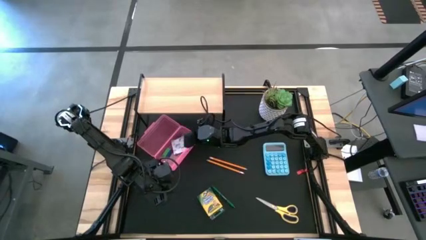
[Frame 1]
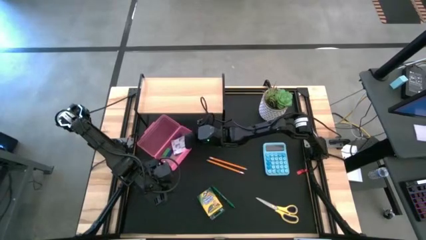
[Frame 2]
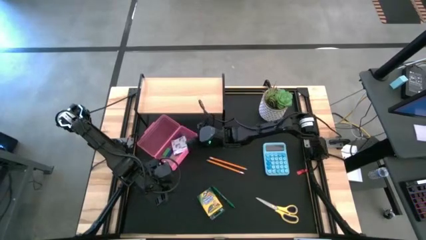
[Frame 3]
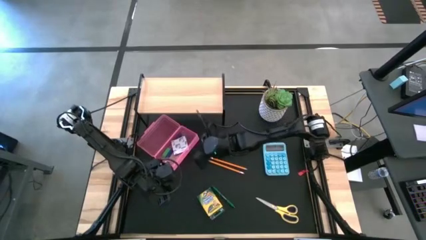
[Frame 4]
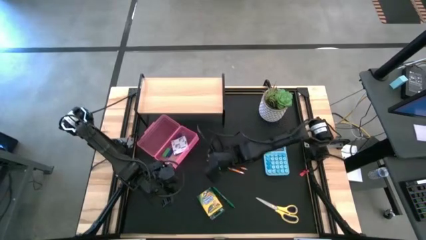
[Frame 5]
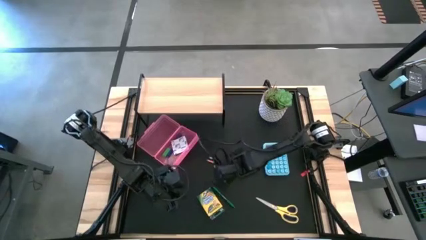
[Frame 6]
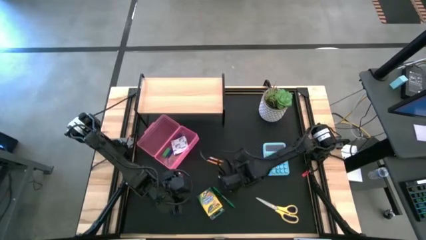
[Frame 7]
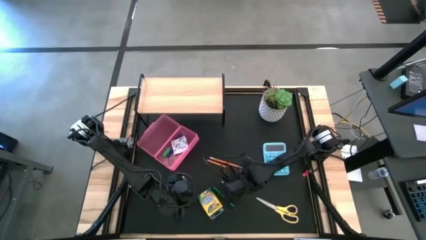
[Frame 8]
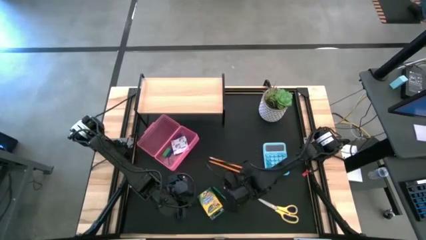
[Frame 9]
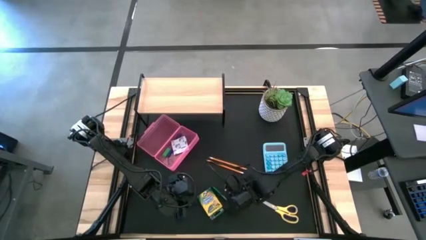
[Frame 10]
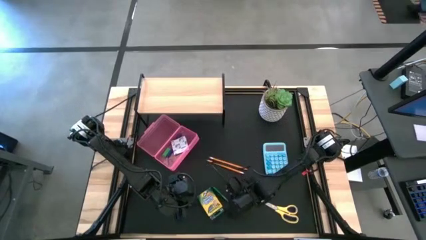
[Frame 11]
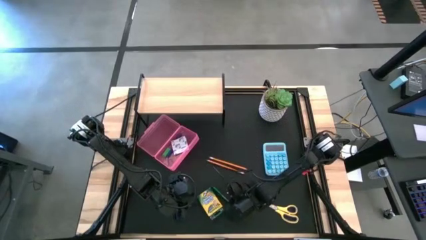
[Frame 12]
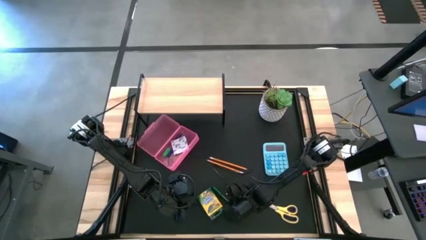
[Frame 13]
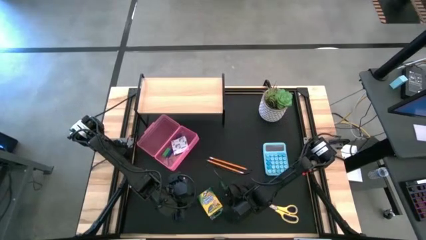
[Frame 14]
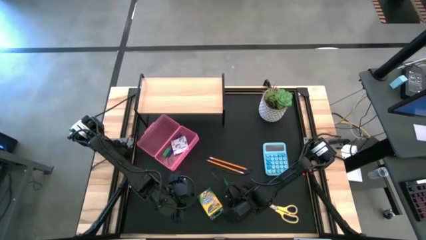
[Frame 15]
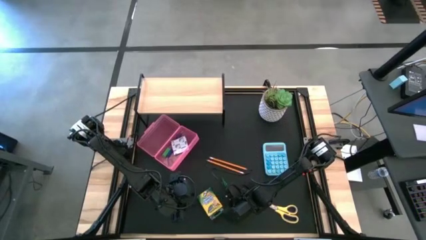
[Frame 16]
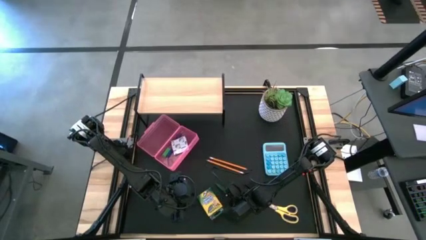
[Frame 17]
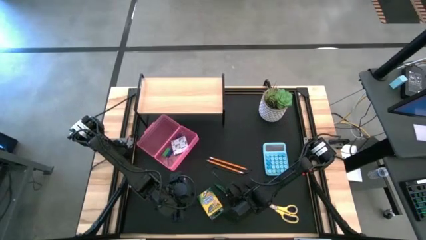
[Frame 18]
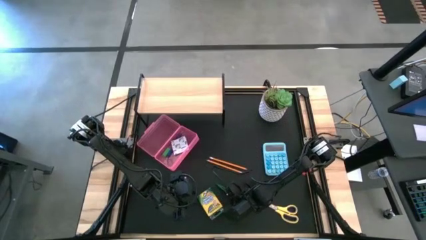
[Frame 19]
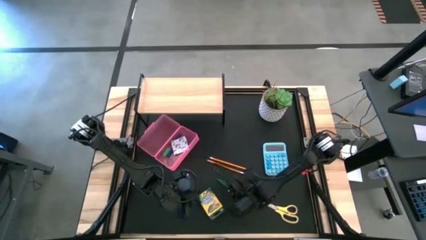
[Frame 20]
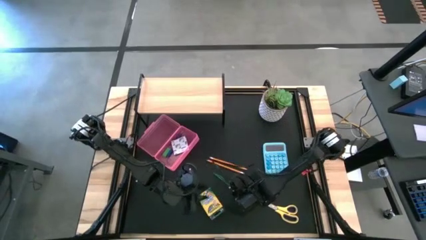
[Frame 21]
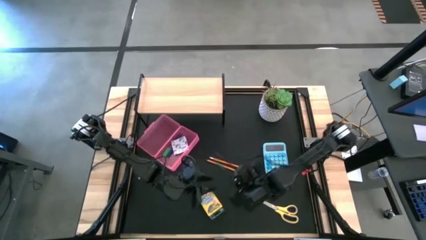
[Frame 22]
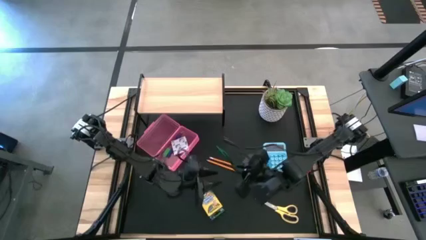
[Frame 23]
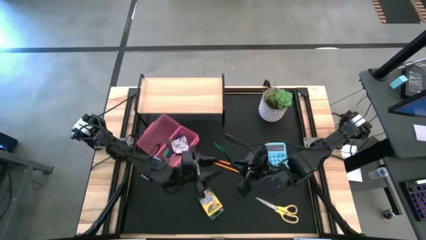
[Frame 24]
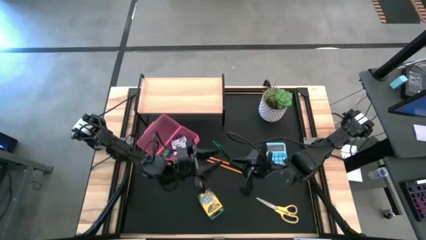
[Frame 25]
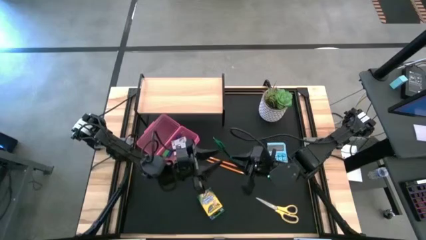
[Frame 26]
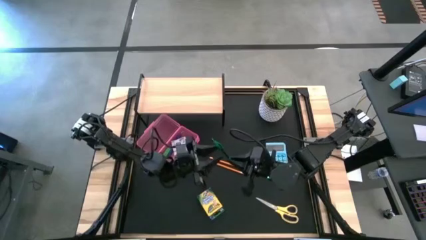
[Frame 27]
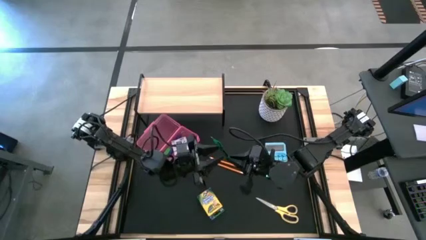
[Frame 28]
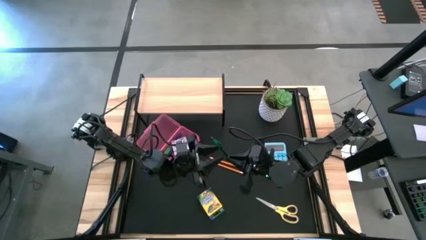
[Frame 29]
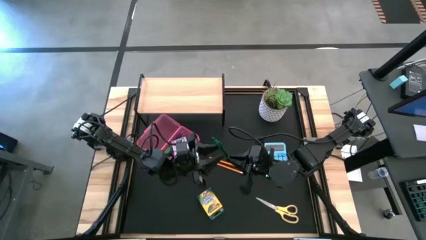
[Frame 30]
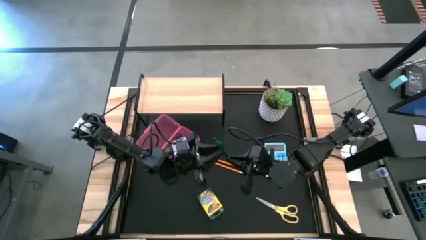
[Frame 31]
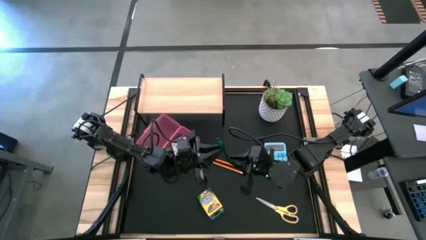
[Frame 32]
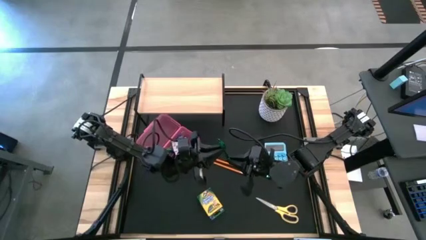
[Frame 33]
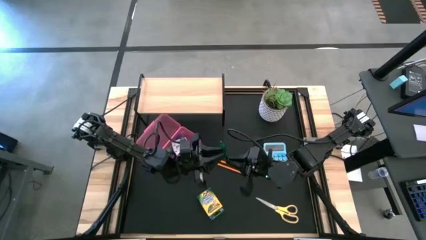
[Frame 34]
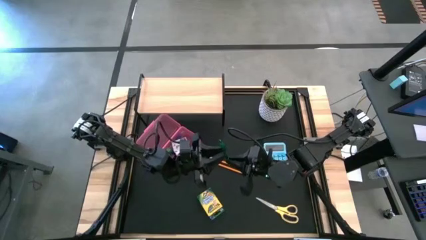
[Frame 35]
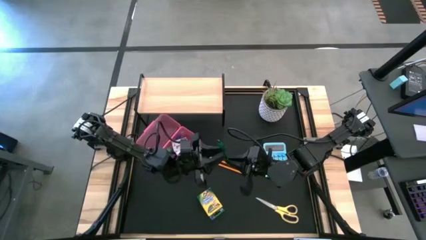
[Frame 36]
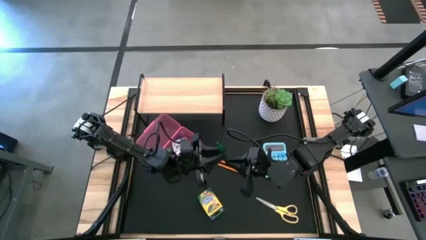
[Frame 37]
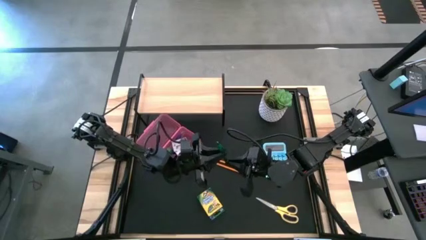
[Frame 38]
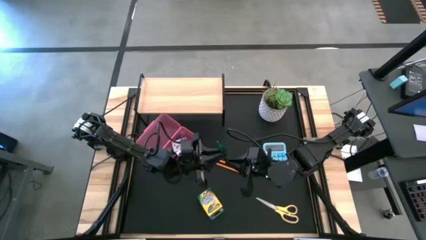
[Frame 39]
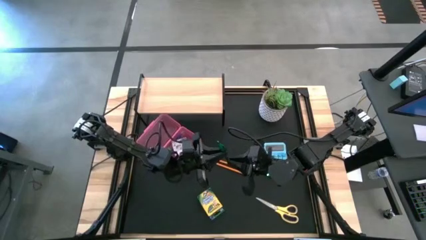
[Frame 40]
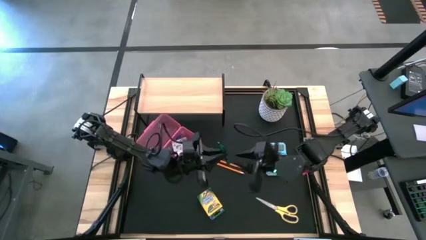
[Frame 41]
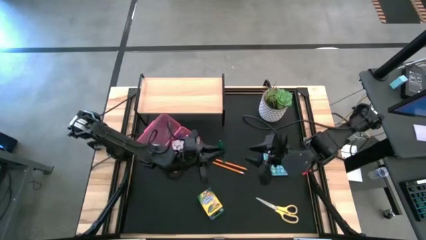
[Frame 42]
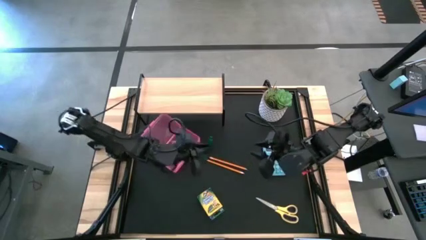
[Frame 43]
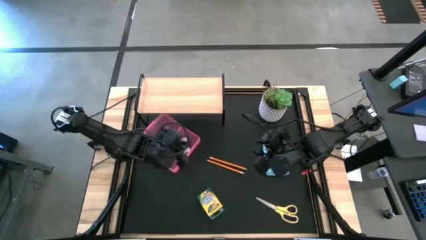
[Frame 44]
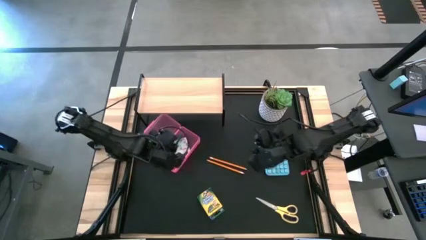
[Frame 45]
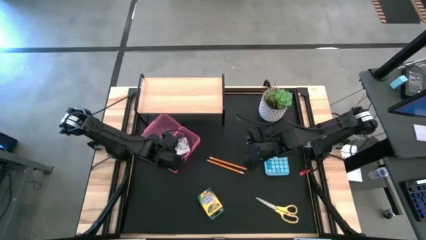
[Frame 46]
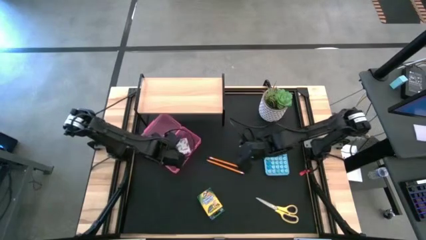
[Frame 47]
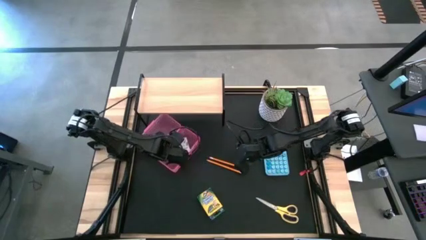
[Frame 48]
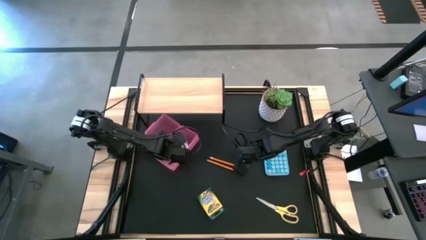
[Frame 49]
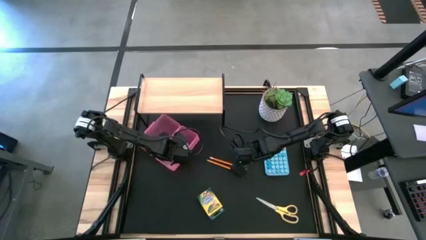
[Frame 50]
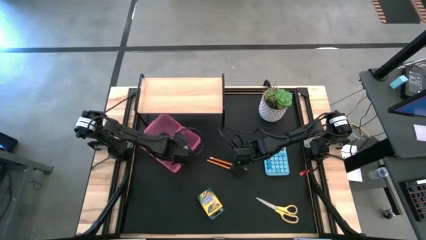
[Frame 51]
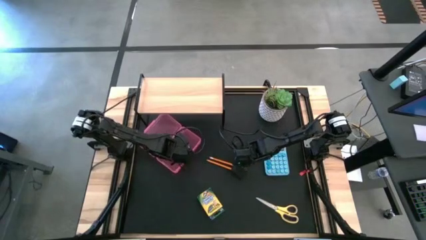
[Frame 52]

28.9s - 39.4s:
Task: Pack school essentials
Put the green pen into the pencil box

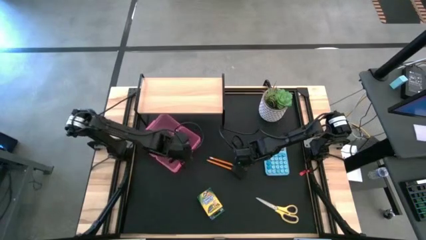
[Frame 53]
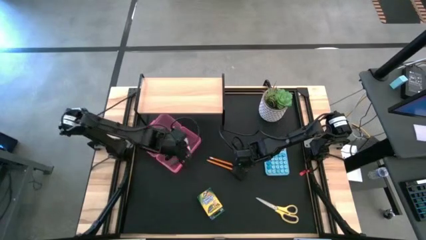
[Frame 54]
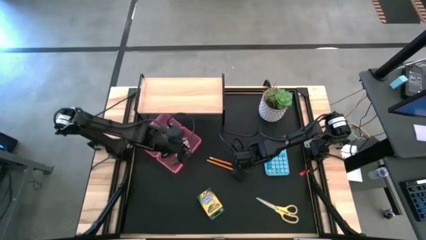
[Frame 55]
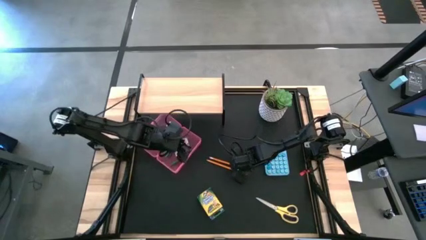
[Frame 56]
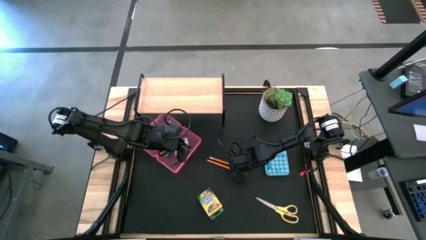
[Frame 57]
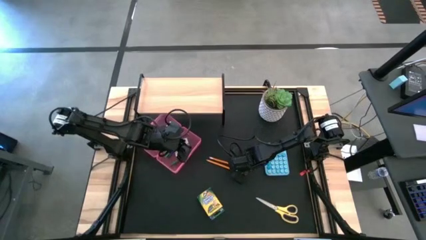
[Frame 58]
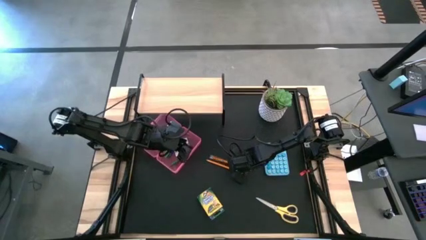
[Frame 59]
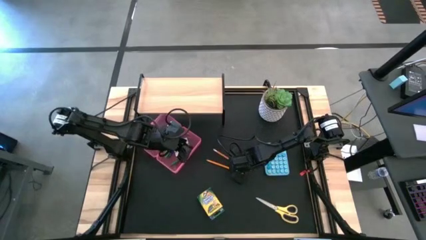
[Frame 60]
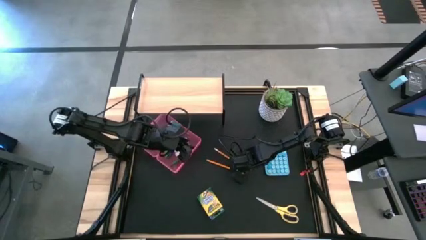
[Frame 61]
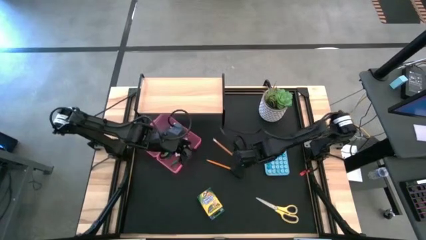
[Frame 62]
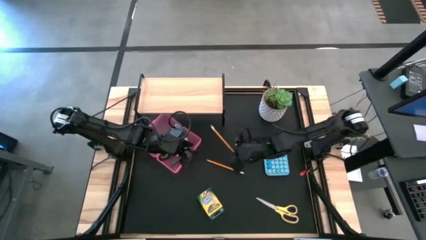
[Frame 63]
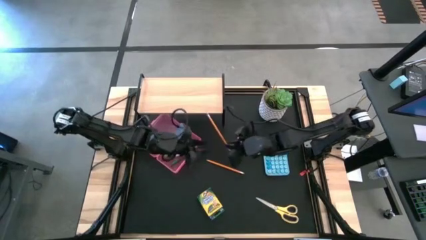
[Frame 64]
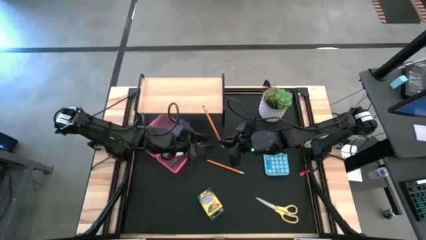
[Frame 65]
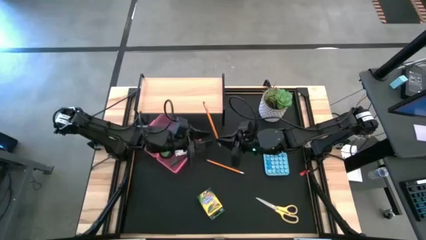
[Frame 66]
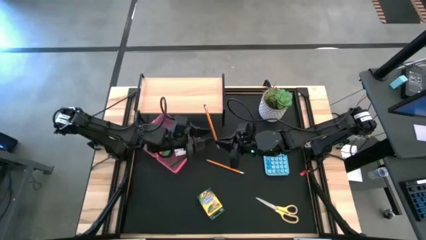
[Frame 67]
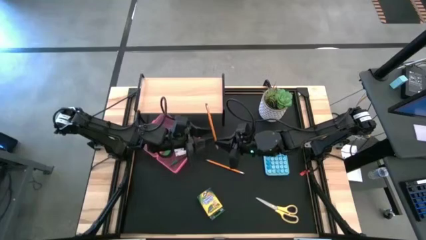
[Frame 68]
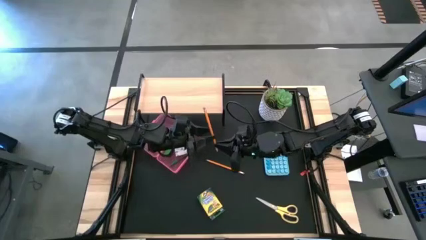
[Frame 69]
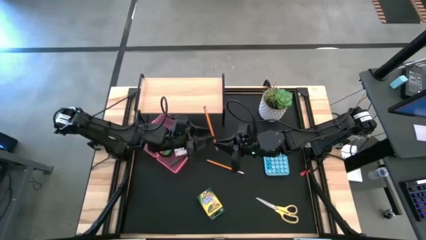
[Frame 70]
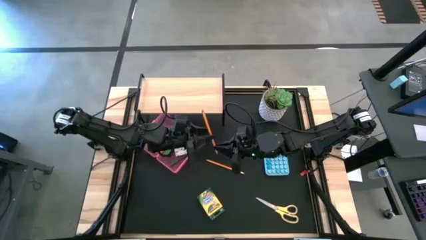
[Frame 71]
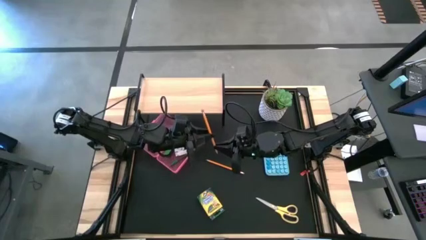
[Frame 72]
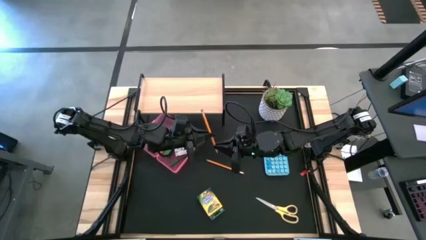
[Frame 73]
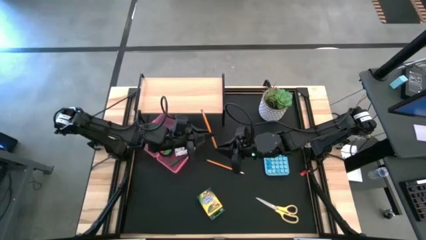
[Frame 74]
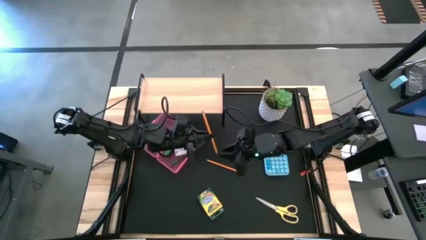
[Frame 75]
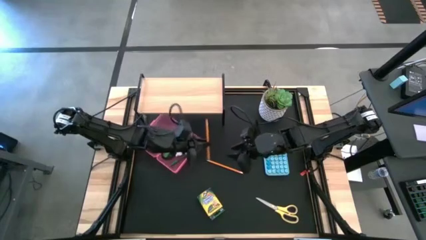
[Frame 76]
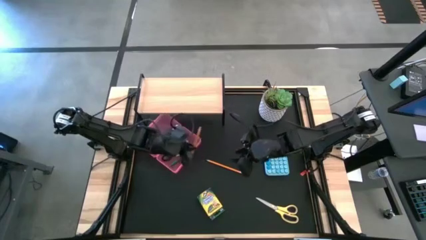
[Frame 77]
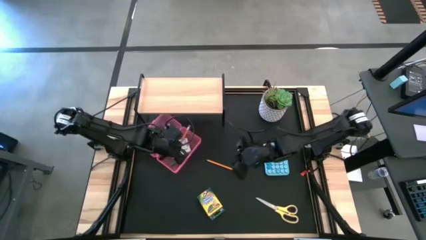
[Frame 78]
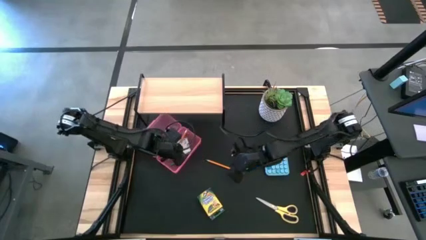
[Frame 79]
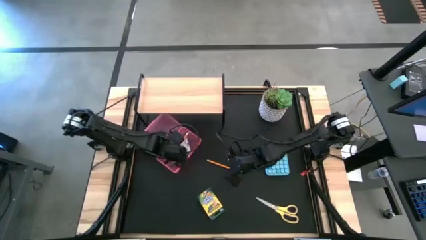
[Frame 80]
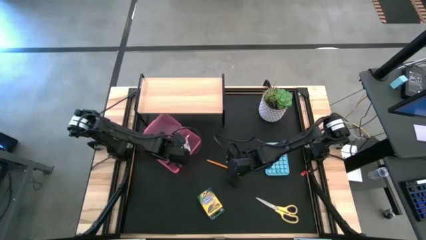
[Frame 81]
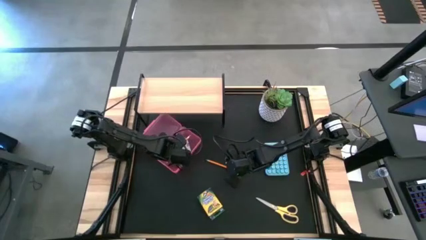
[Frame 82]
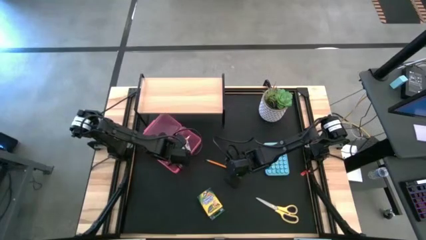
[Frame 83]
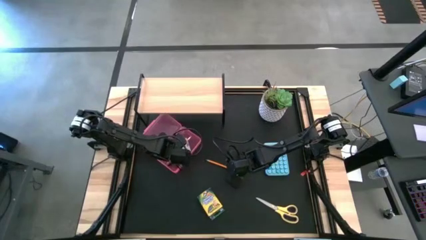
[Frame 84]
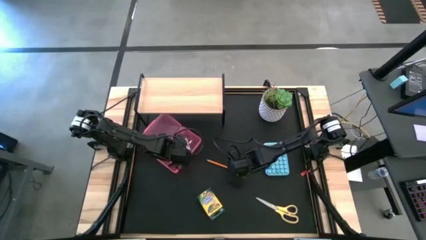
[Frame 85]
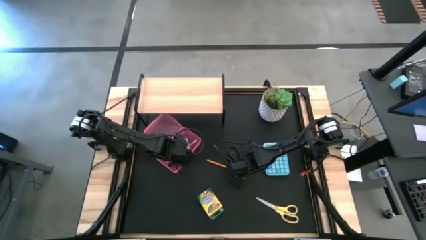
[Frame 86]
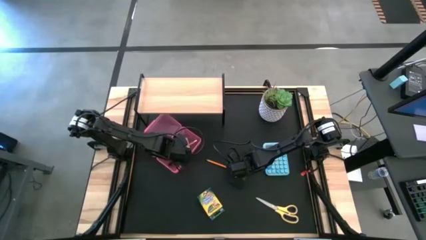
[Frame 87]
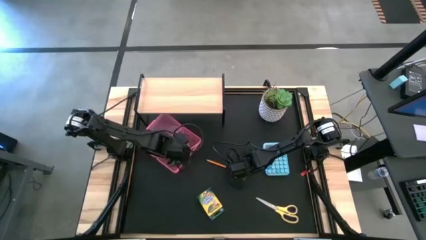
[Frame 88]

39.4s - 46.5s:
Put the top pencil into the pencil box
